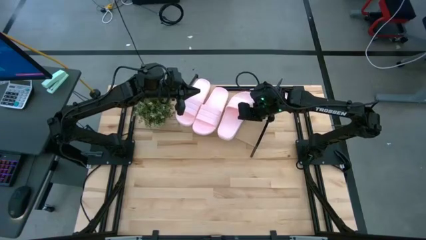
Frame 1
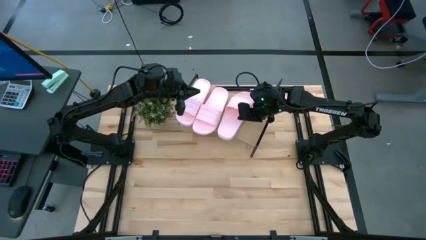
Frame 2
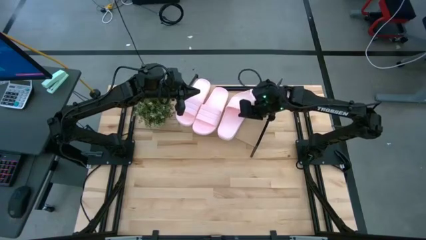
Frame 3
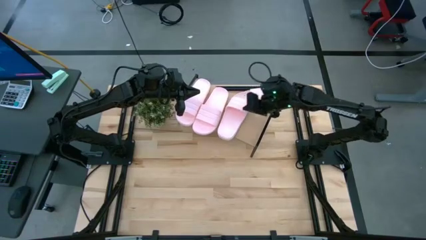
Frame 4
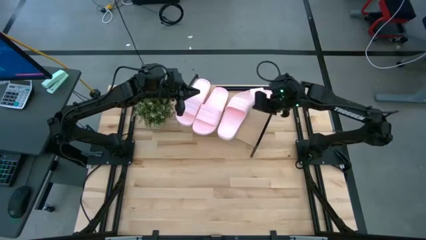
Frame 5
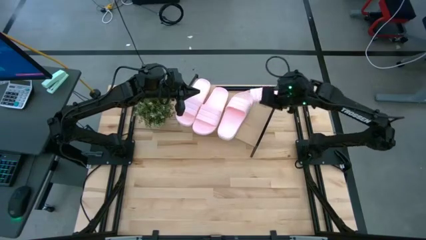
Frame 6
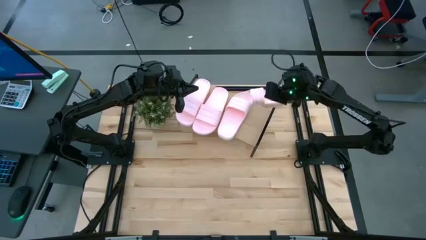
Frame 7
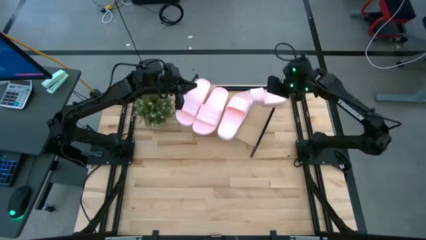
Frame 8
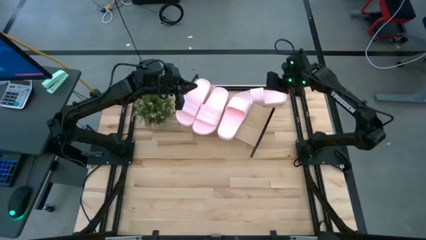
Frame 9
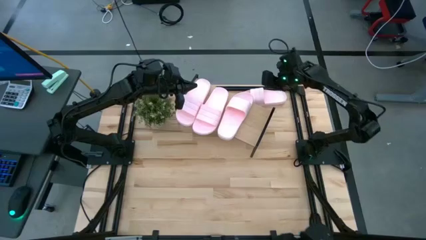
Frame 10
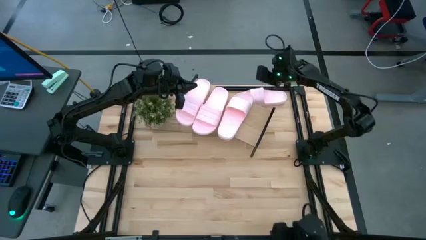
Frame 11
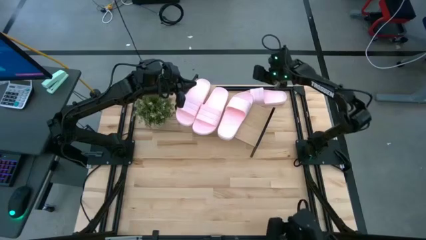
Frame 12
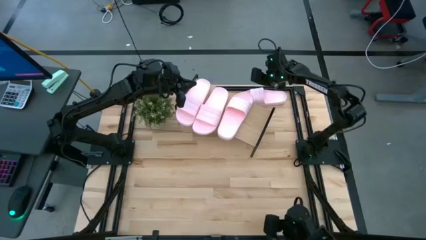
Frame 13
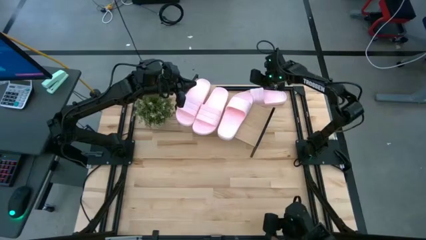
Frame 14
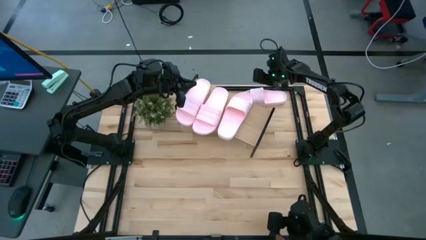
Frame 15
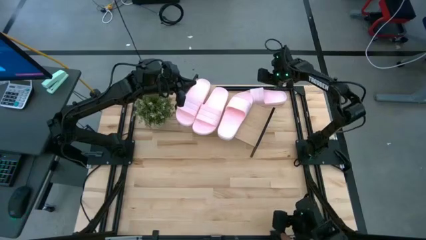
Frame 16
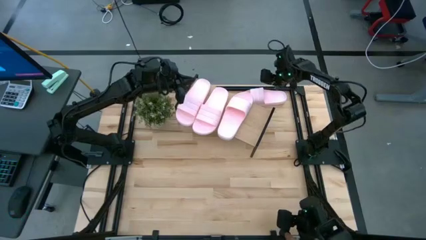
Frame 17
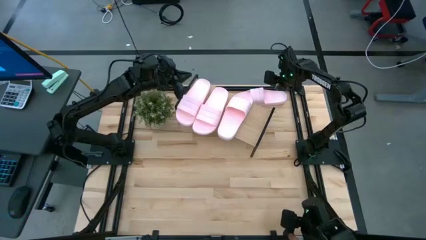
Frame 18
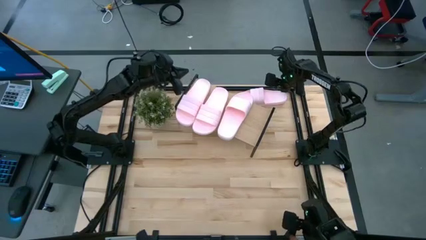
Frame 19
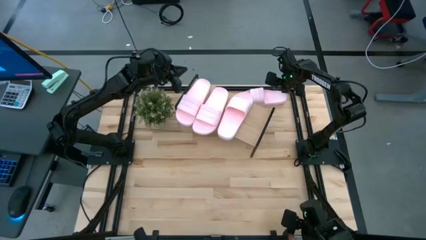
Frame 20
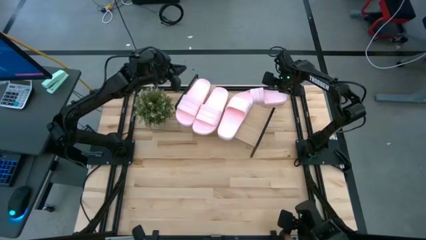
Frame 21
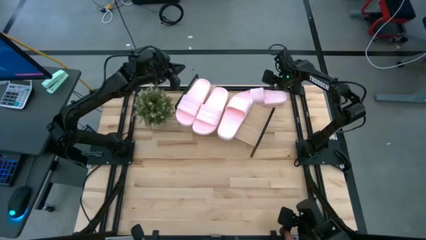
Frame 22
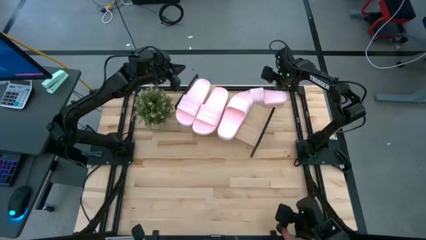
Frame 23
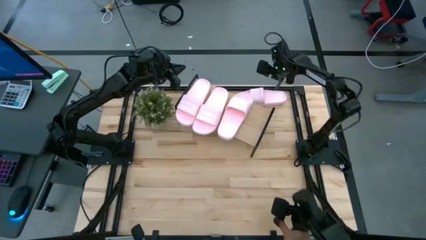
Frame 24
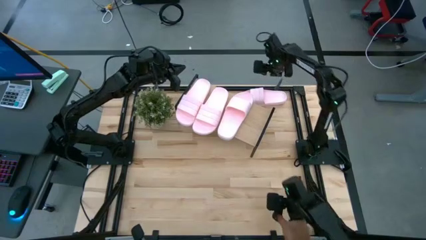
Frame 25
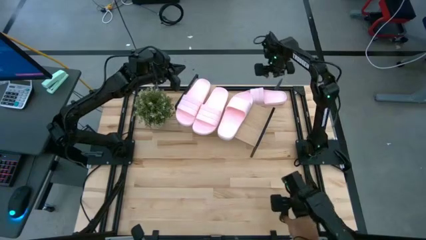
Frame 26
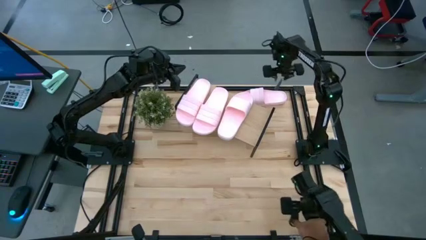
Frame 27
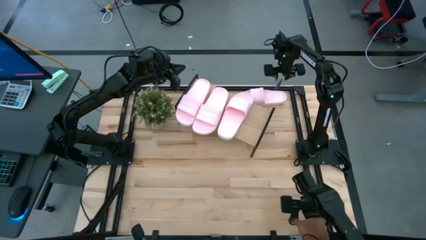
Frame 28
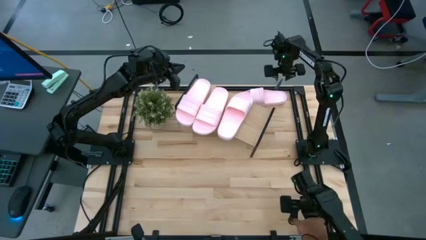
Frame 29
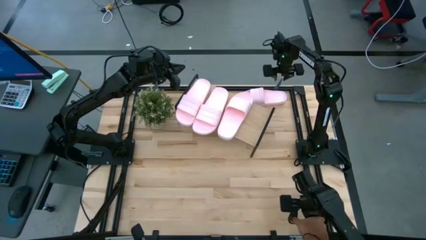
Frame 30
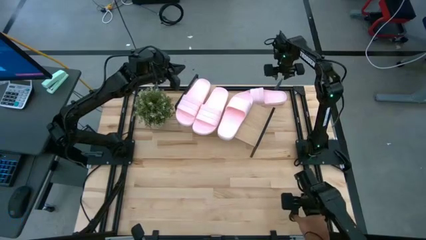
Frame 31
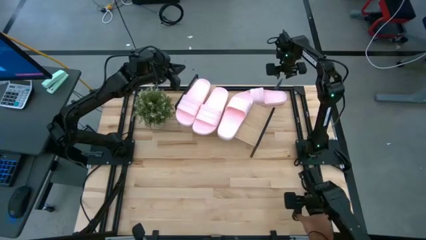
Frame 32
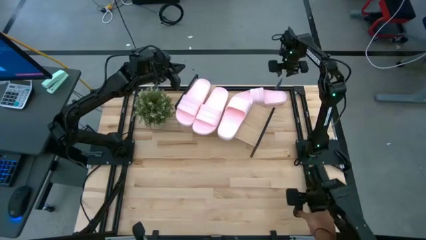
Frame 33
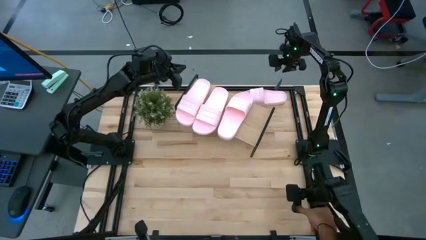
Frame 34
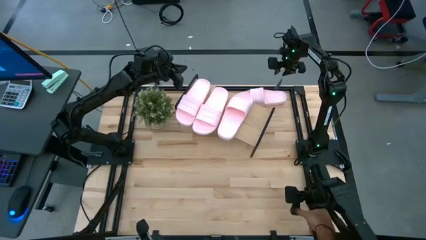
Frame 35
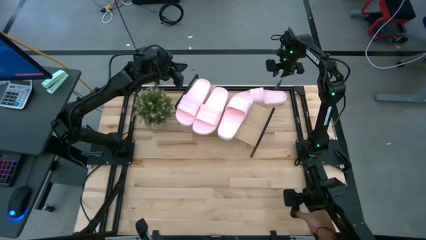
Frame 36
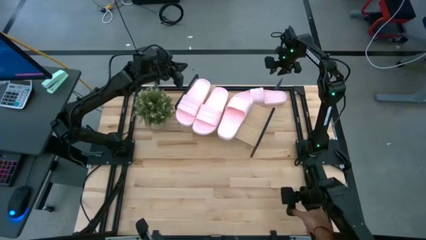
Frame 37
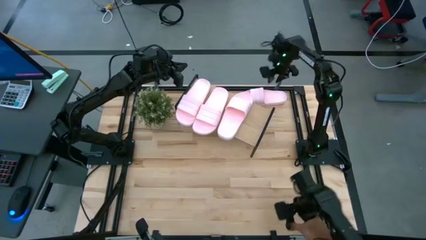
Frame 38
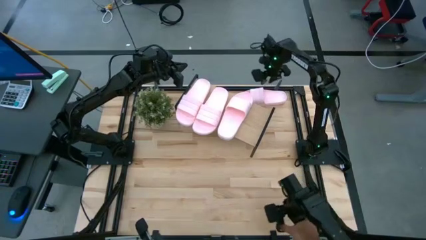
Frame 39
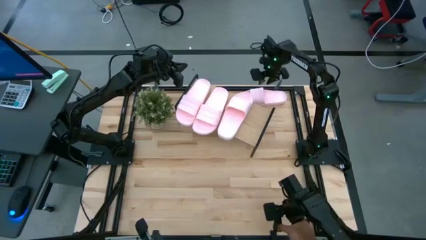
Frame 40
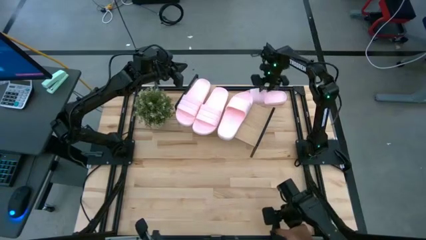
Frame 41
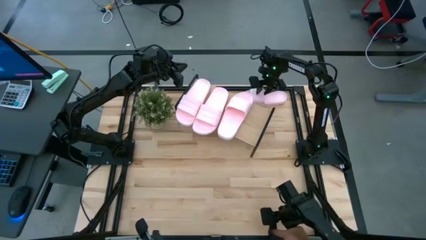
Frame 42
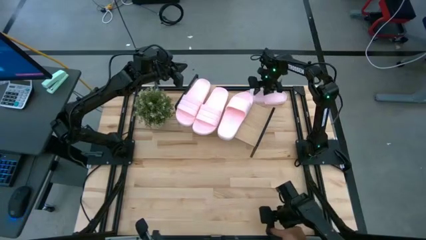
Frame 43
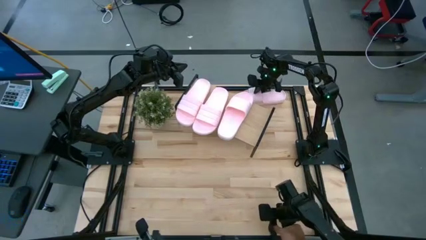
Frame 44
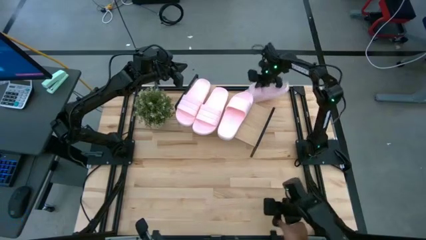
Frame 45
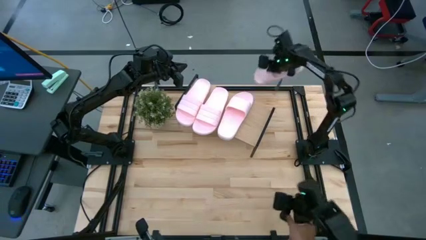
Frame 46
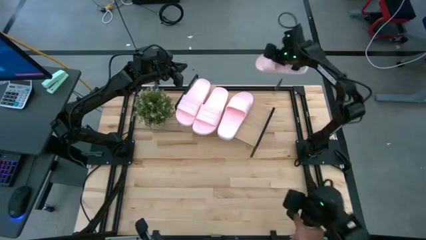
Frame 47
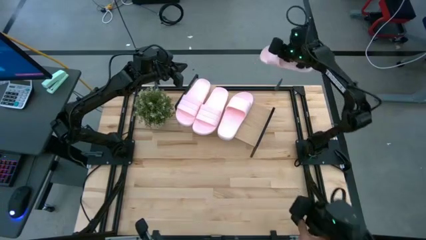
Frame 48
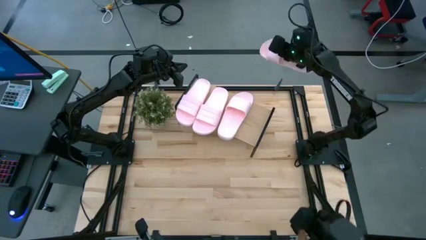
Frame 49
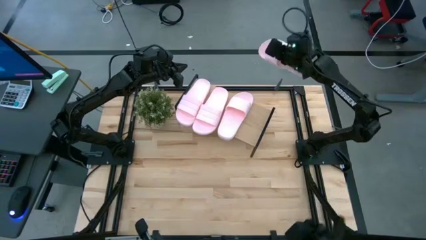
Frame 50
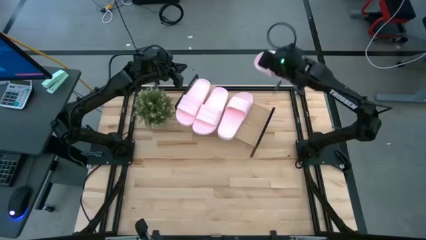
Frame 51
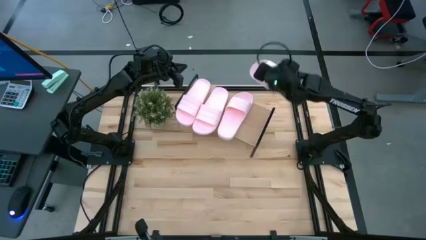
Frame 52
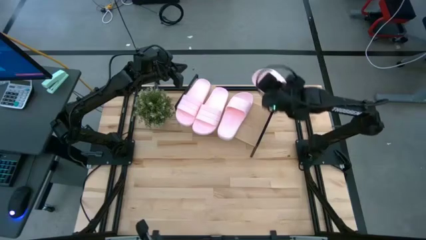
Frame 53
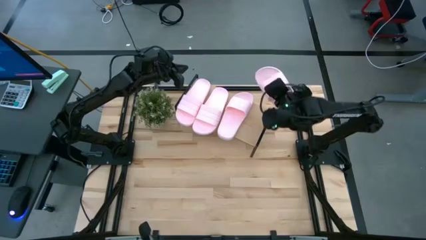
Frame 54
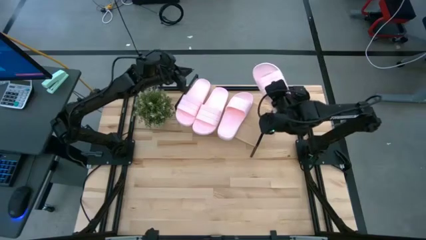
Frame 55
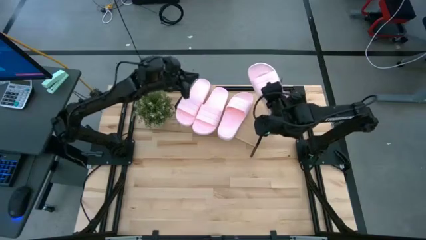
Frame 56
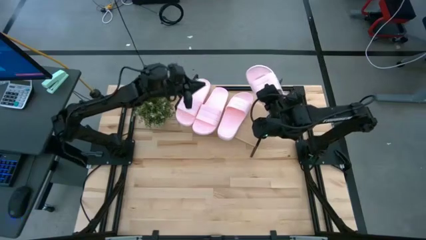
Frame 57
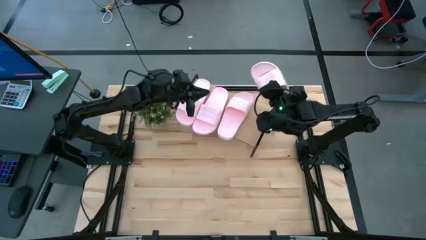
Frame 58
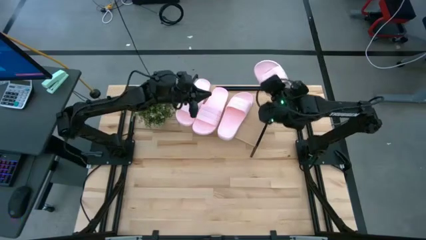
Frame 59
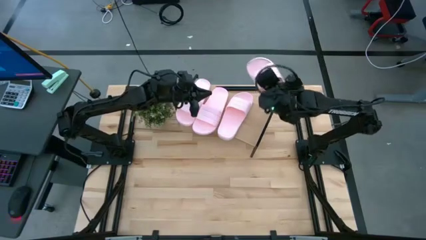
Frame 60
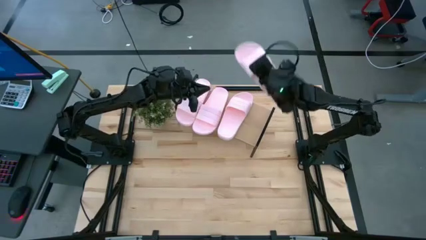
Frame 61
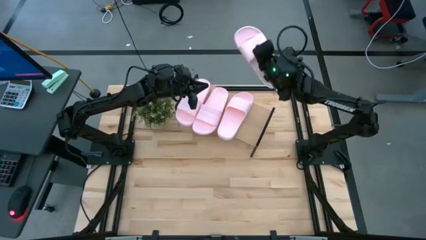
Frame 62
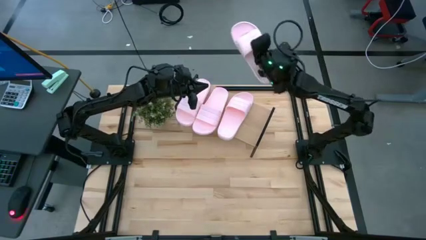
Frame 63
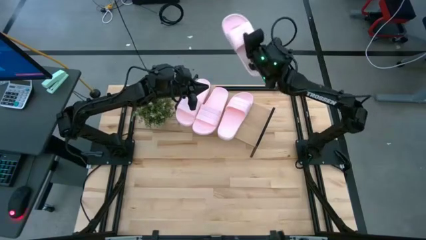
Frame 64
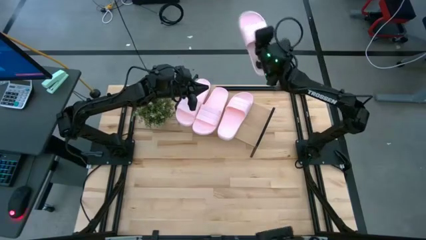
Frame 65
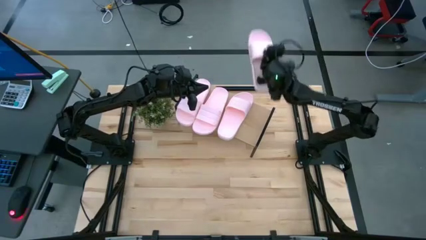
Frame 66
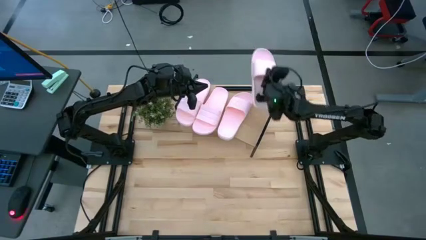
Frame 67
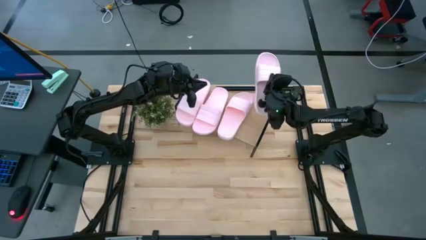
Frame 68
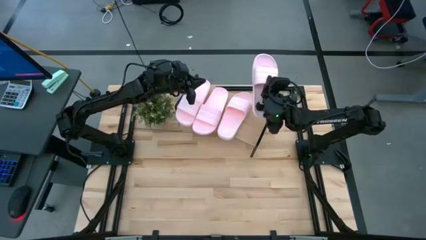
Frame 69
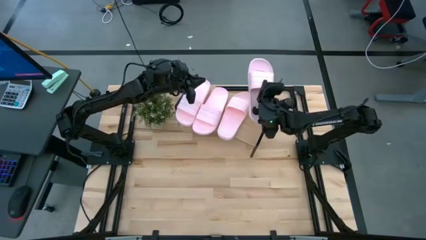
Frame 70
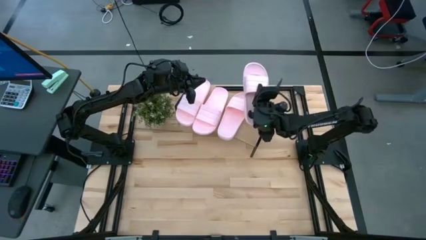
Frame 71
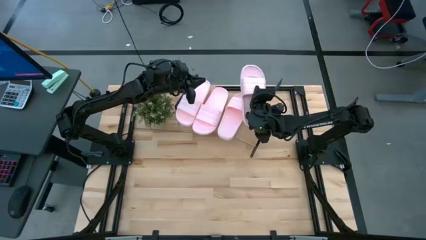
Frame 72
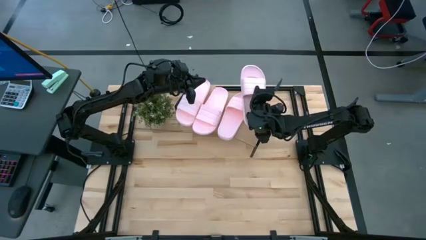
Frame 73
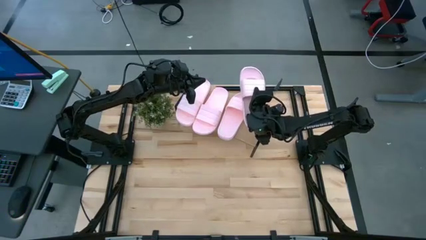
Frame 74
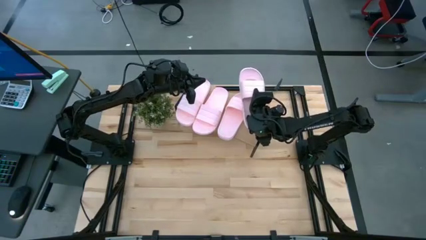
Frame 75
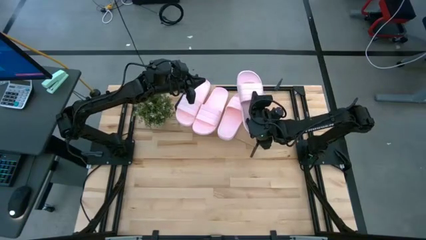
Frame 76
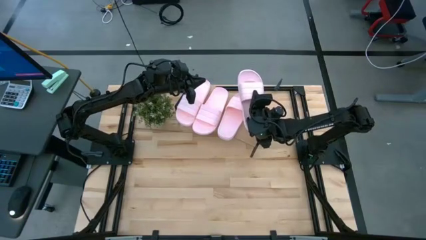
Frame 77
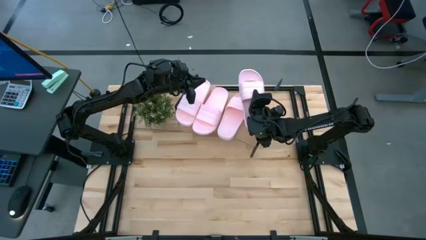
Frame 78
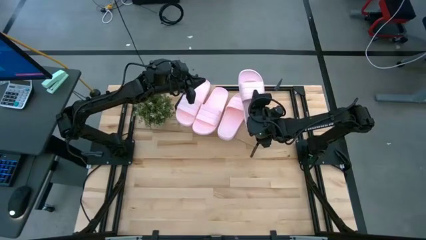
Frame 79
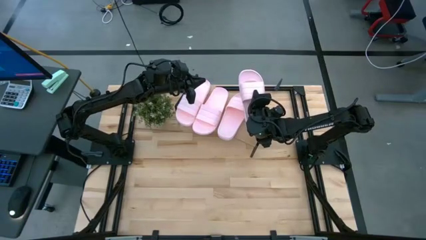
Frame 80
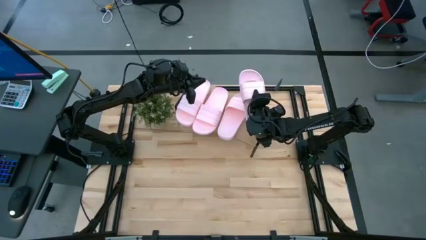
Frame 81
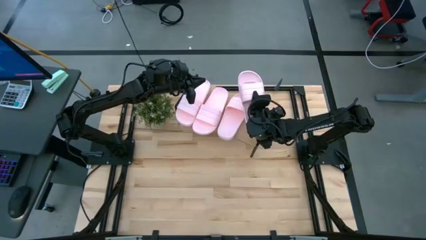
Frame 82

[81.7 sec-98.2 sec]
Task: Pick and place slides into the shelf
Put the pink slide on the shelf
